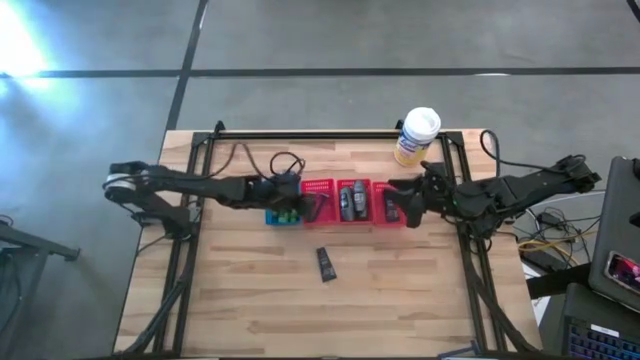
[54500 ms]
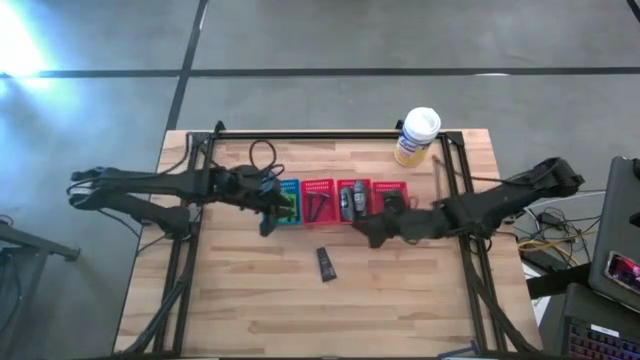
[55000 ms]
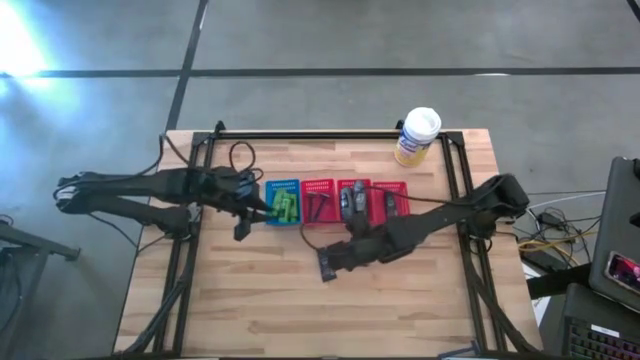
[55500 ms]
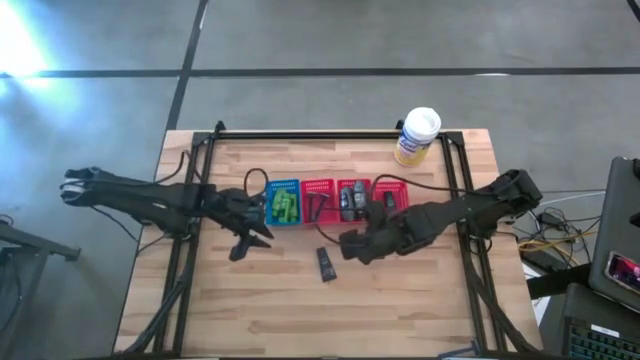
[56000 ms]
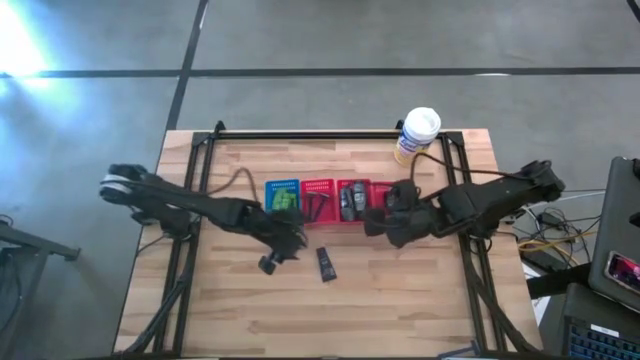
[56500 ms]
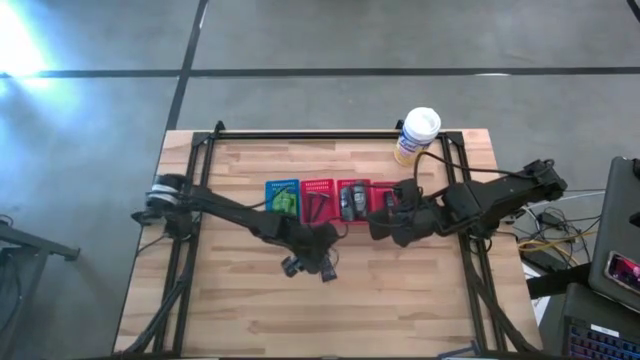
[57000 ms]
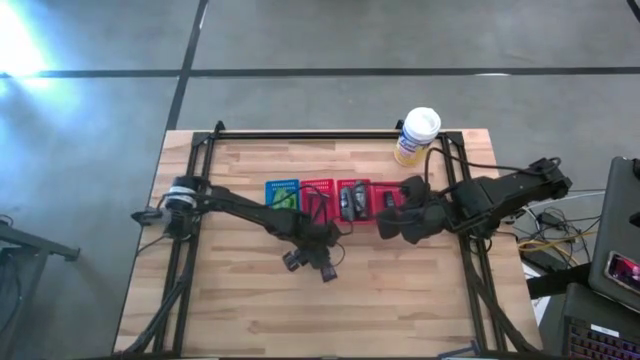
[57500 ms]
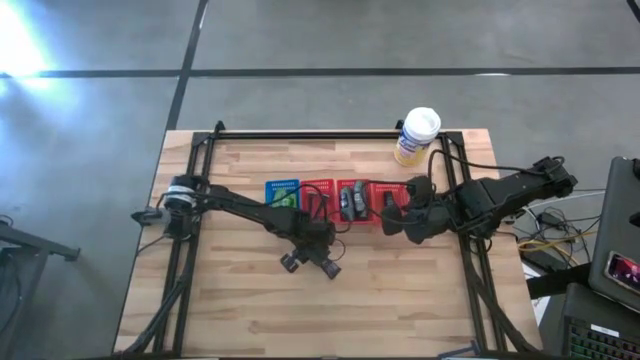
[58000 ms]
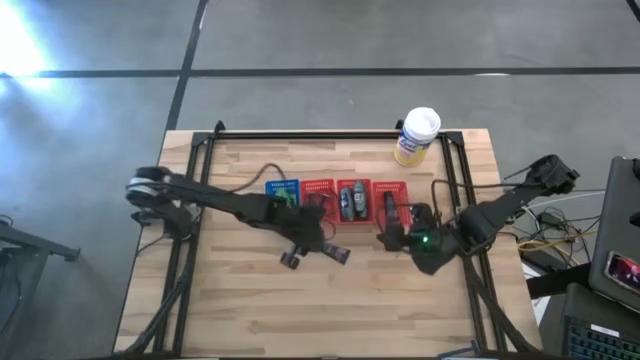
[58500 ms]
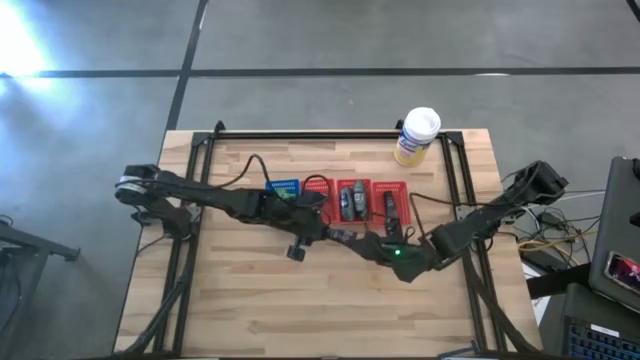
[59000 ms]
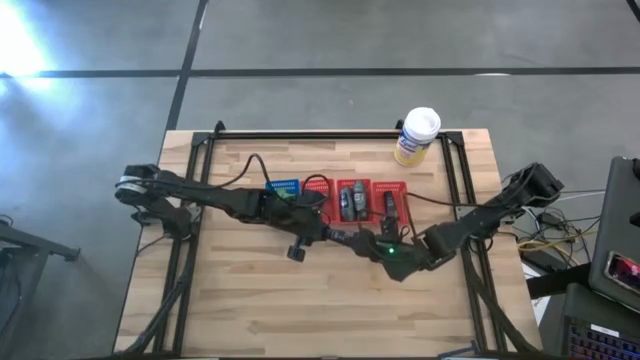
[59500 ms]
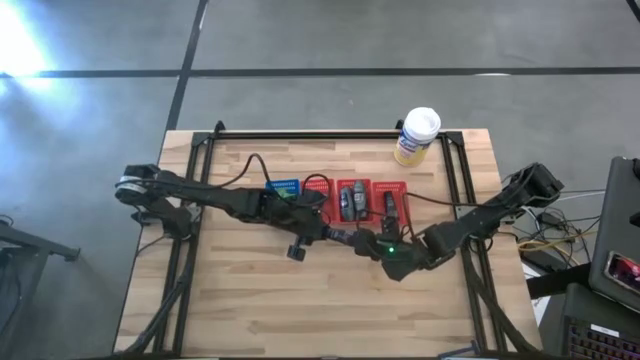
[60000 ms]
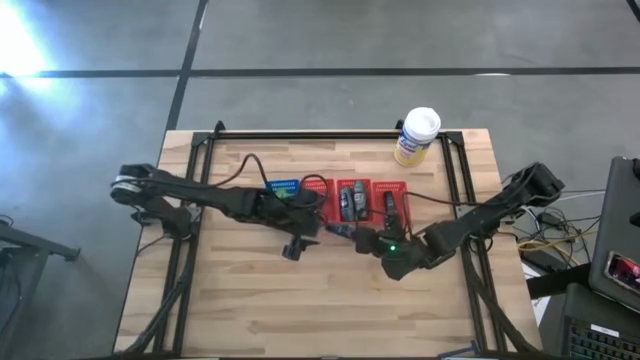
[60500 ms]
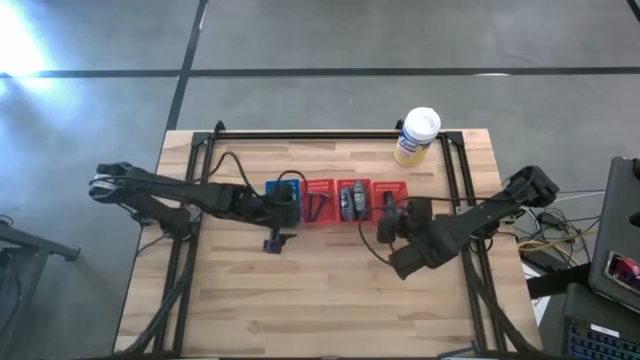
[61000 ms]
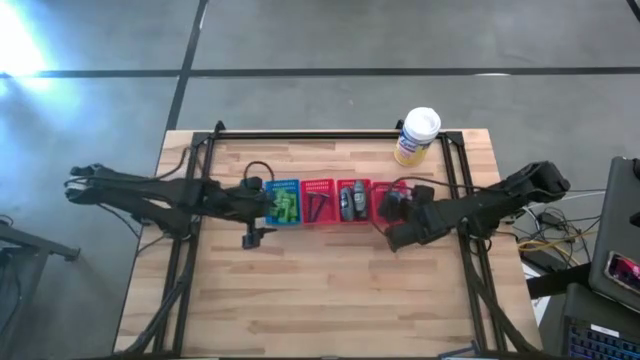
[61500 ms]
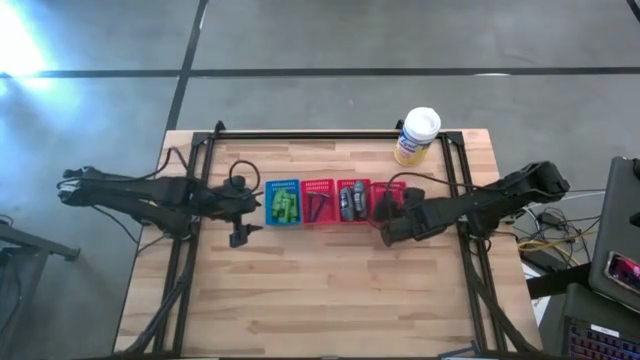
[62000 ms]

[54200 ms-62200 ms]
Task: Pick & Place Travel size toiletries
Put the blue shave cream into the right red bin

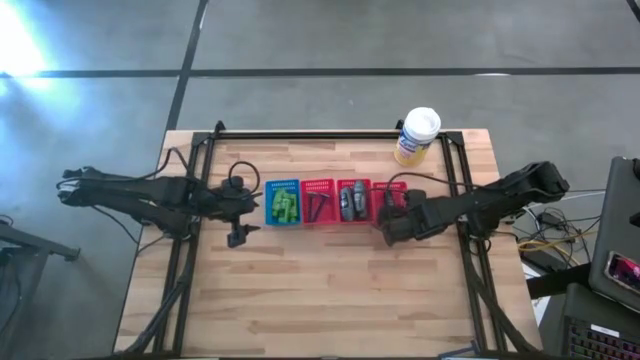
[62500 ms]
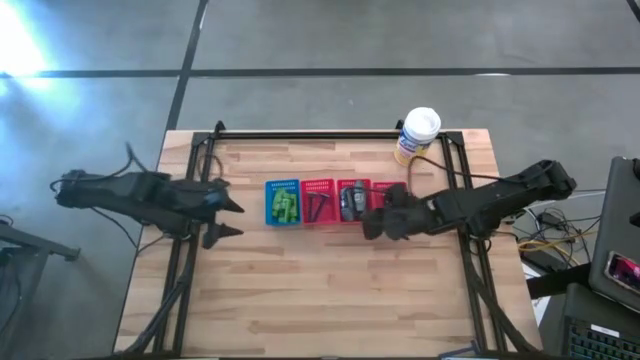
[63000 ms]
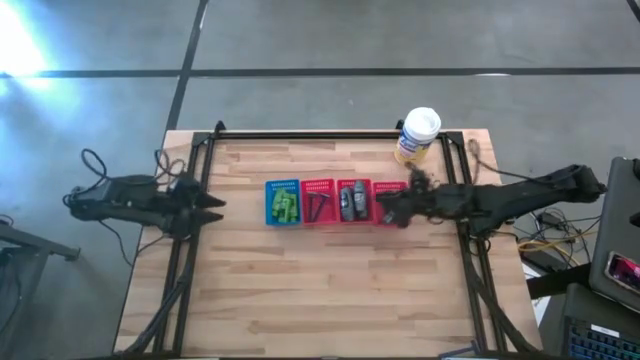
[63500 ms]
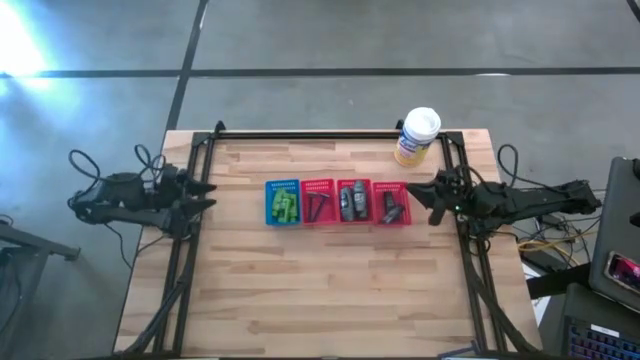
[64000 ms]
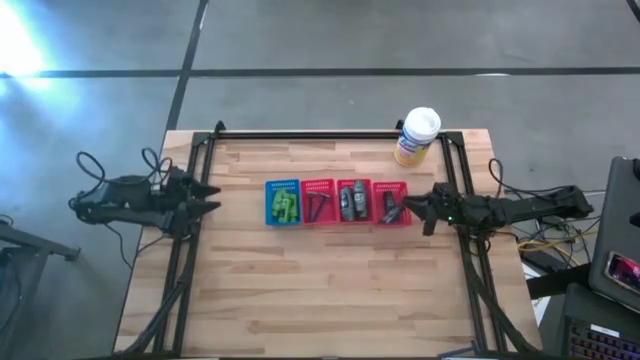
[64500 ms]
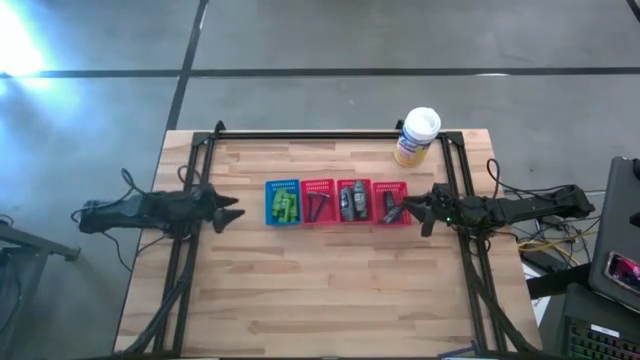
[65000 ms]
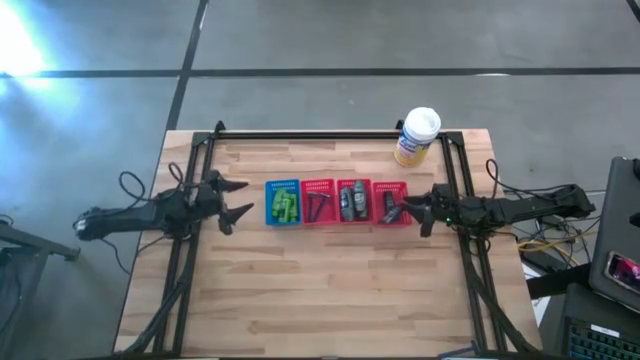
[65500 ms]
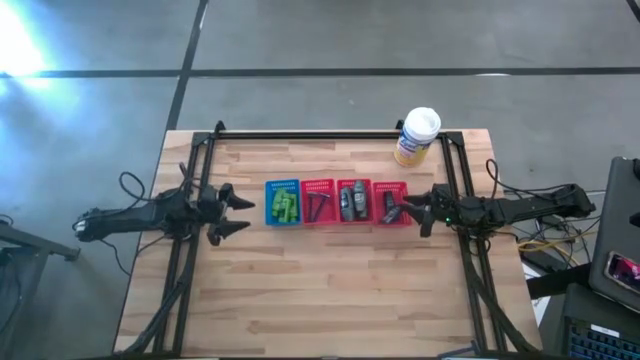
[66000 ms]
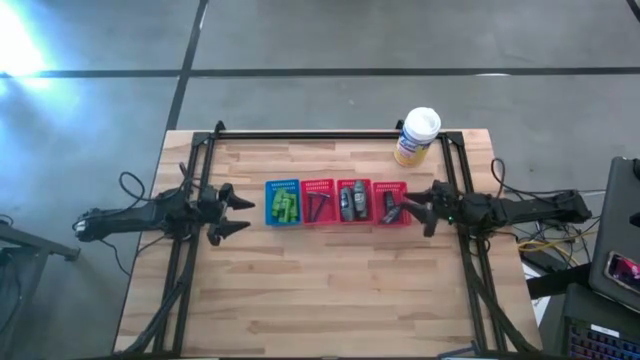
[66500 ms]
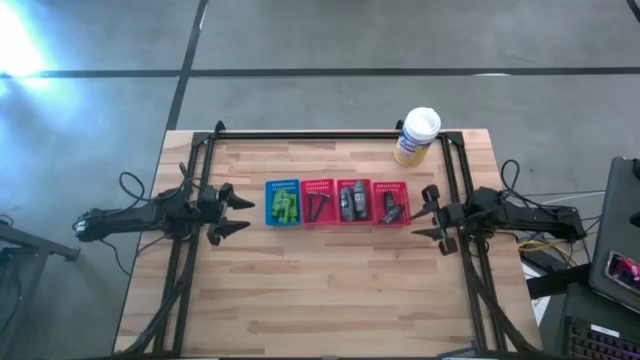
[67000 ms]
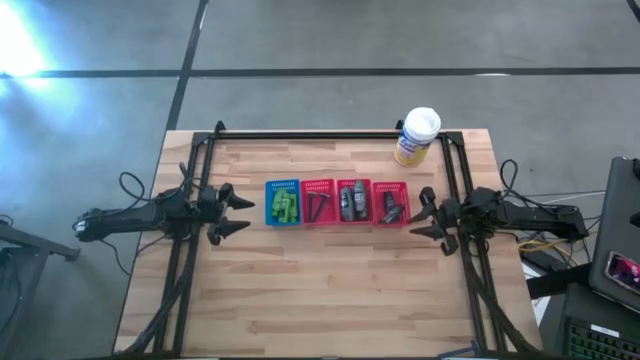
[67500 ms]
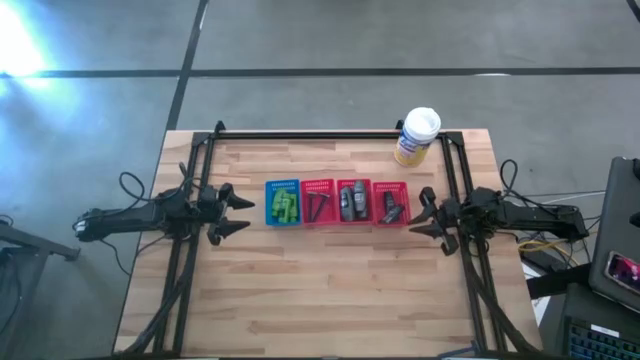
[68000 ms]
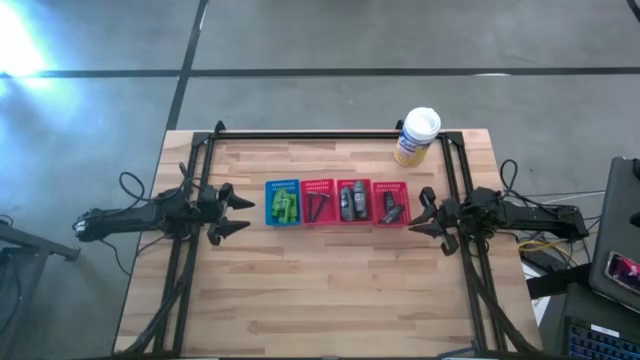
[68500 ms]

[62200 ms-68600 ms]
Return to Home Position

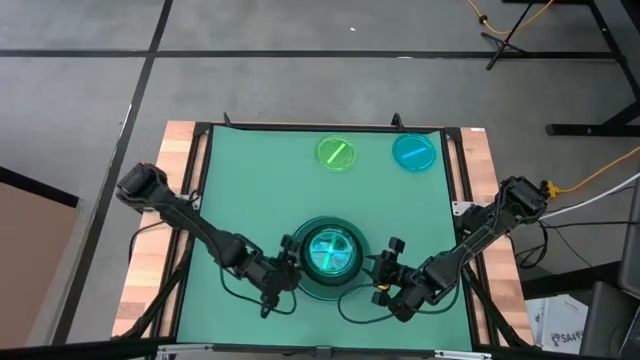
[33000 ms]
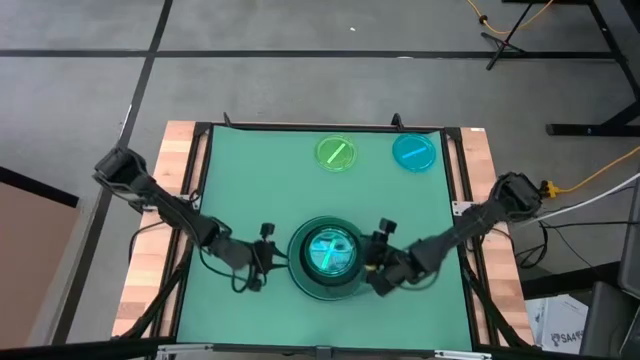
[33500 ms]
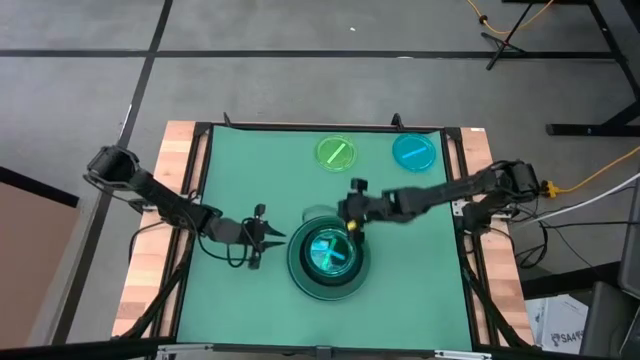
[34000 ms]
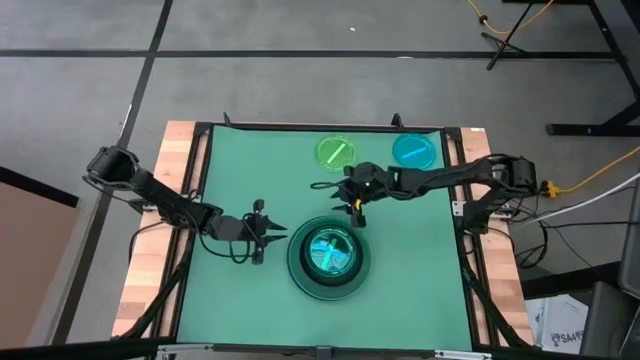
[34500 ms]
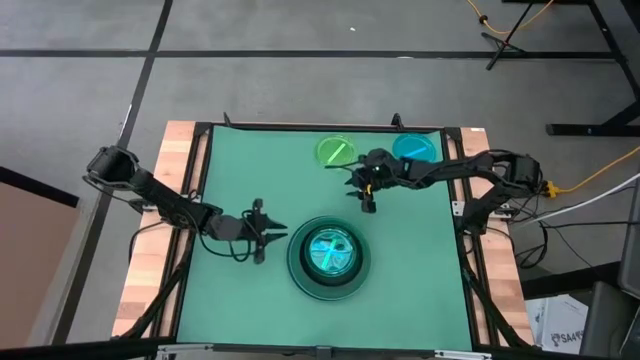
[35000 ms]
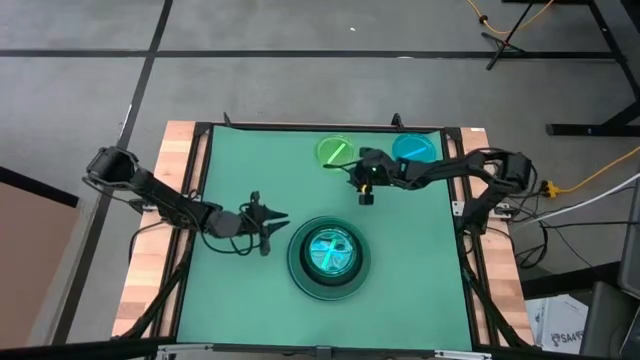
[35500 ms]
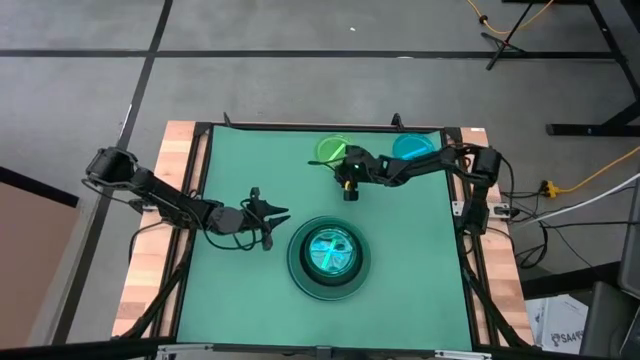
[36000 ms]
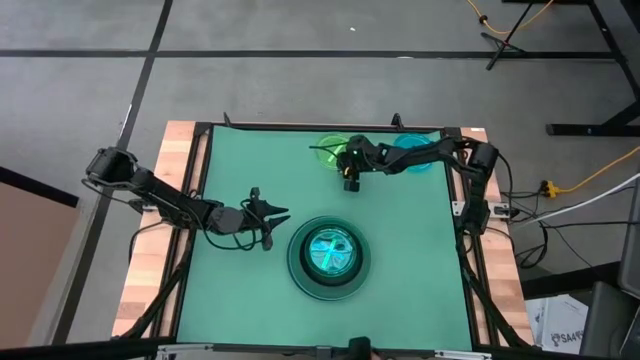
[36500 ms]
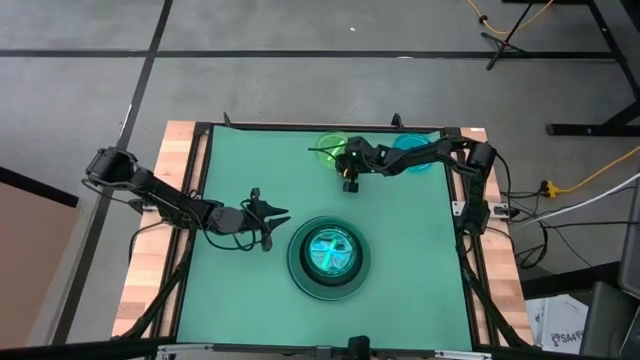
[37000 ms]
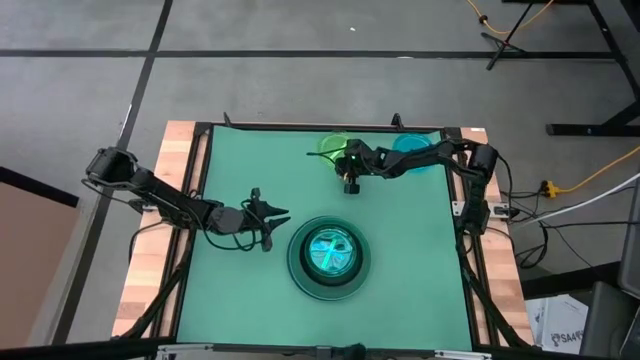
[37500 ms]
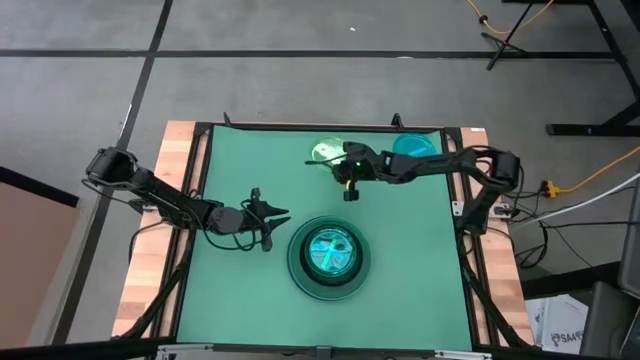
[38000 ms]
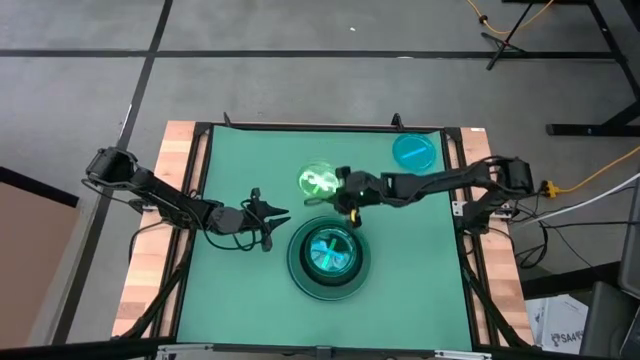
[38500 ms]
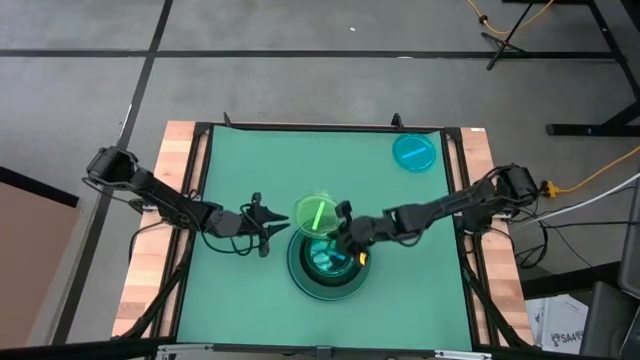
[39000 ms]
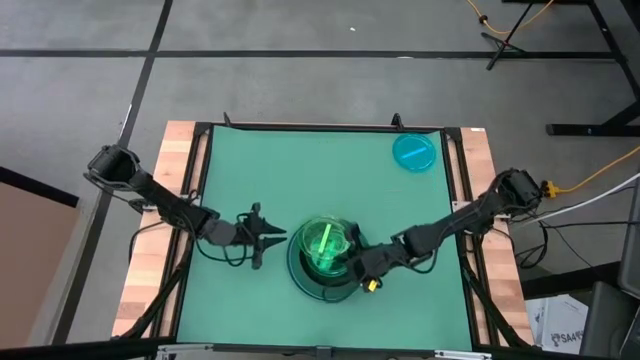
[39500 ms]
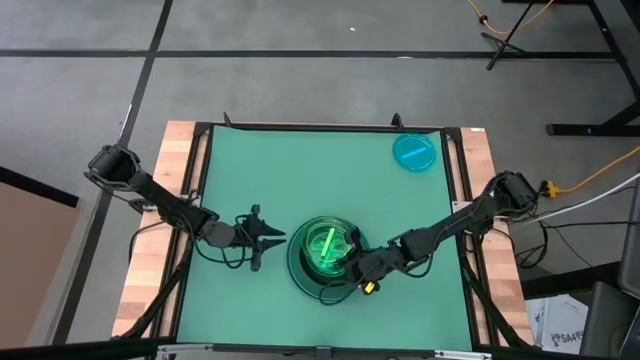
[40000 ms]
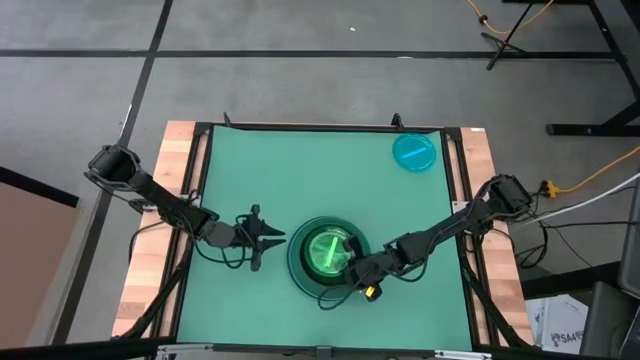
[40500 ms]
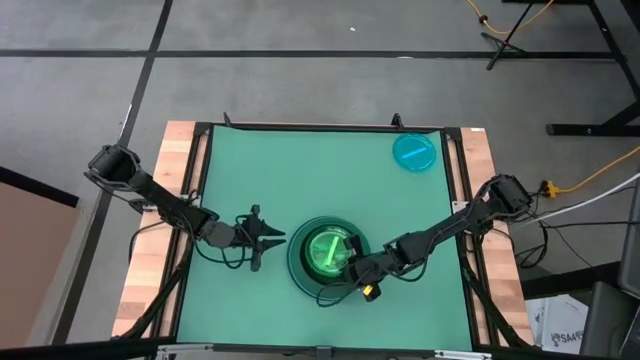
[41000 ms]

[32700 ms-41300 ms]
Task: Stack plastic plates
Stack the green plate on the blue plate
